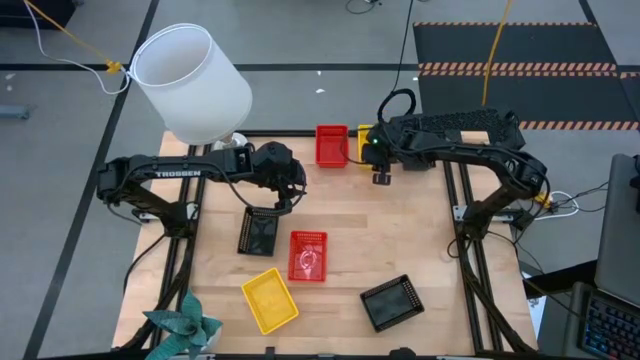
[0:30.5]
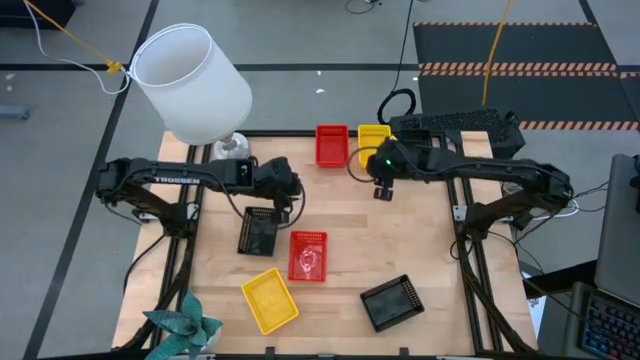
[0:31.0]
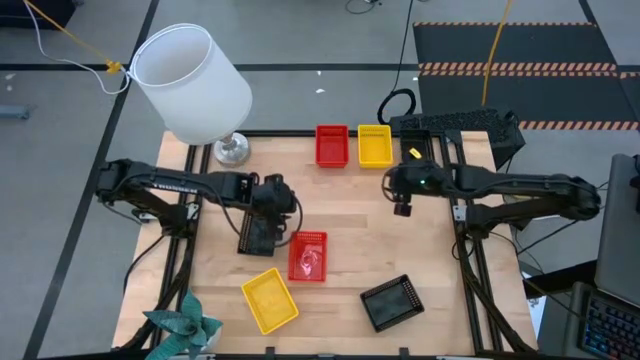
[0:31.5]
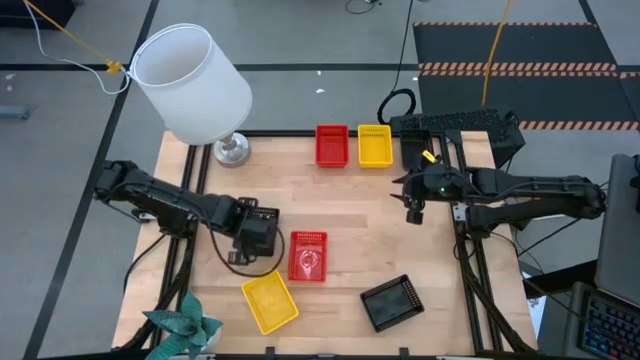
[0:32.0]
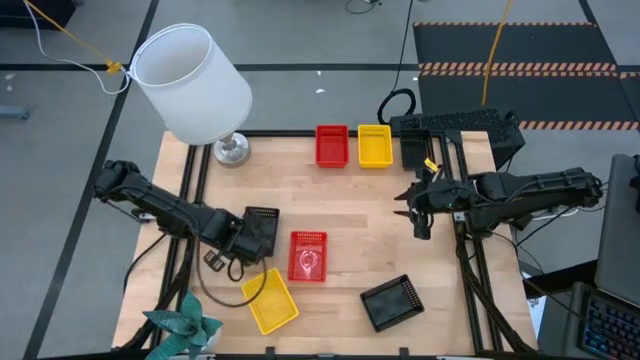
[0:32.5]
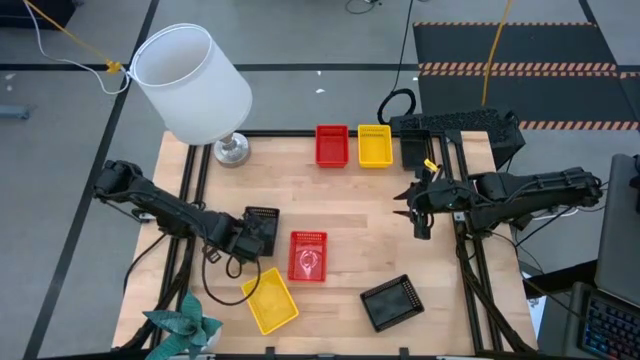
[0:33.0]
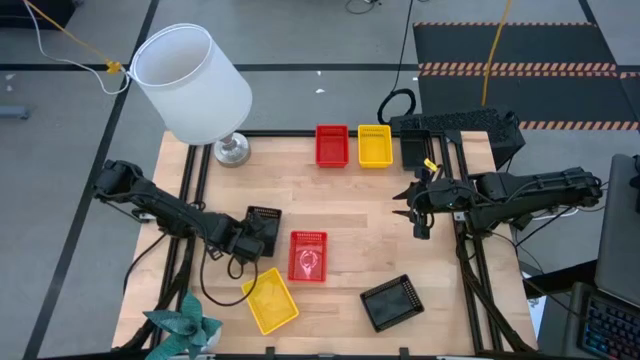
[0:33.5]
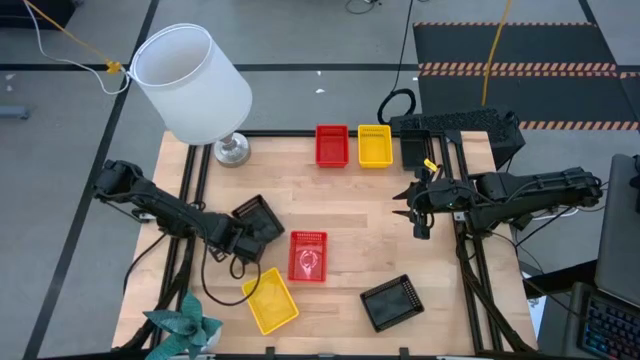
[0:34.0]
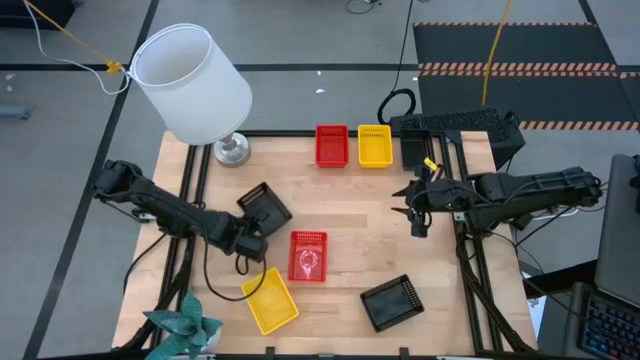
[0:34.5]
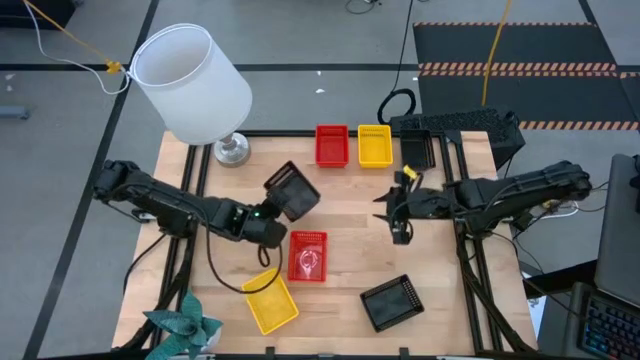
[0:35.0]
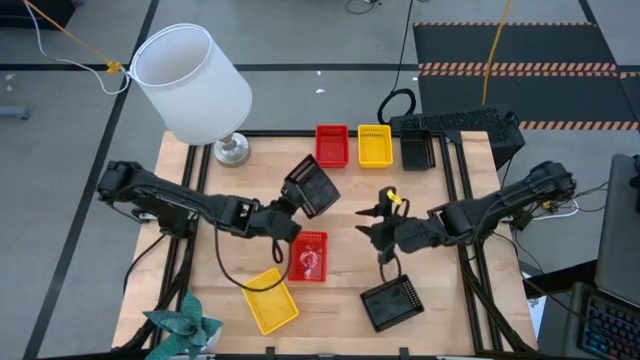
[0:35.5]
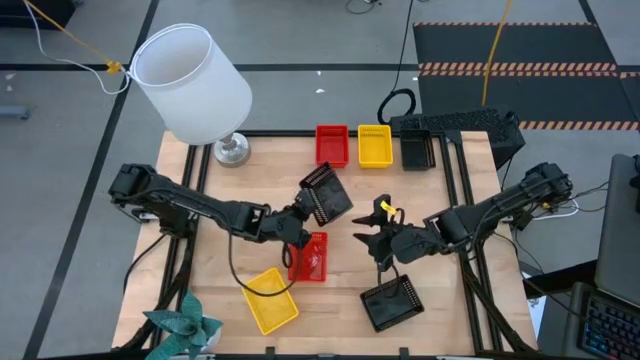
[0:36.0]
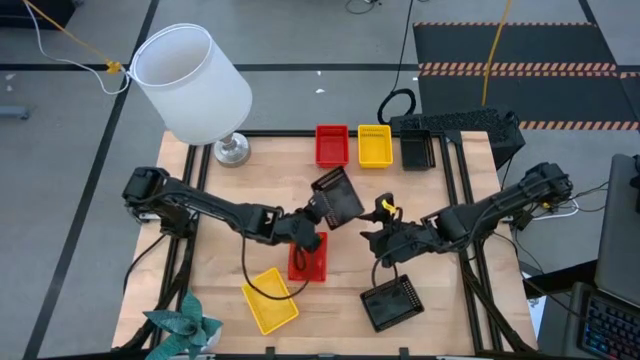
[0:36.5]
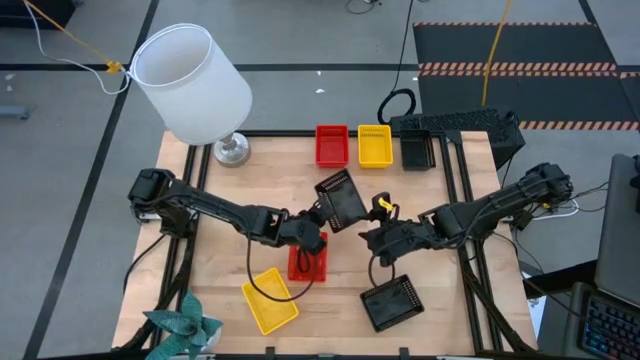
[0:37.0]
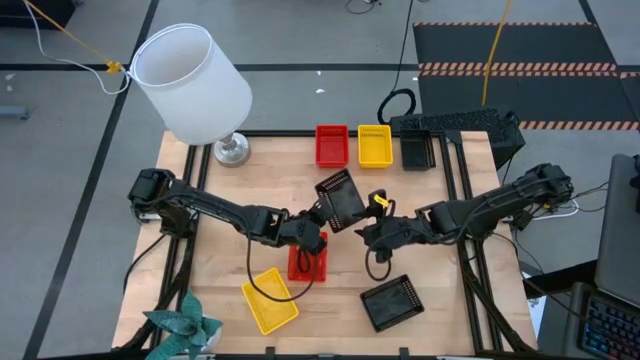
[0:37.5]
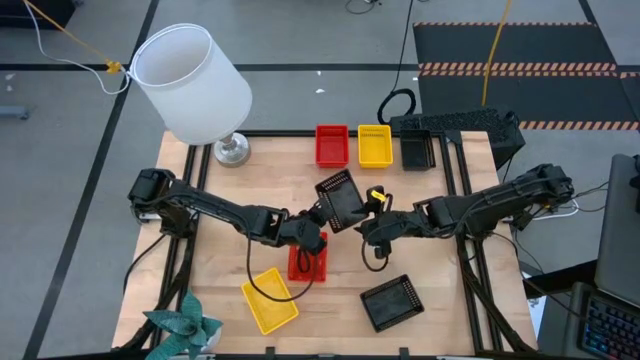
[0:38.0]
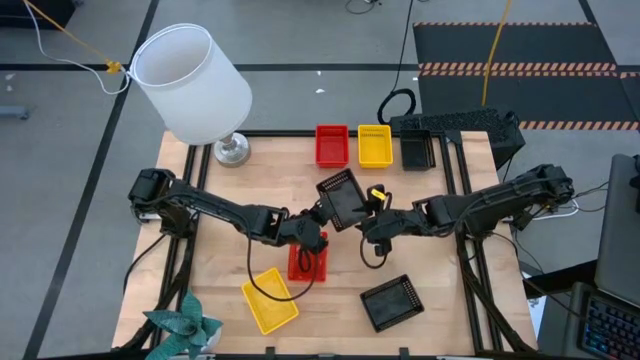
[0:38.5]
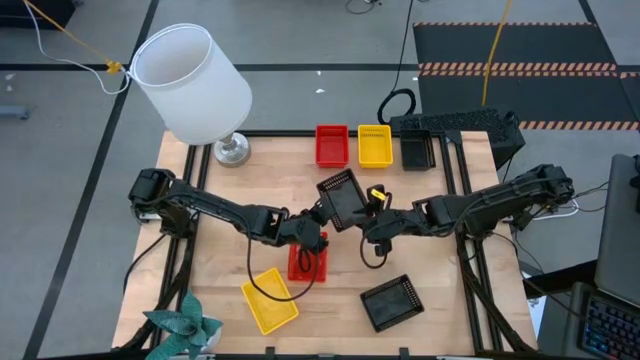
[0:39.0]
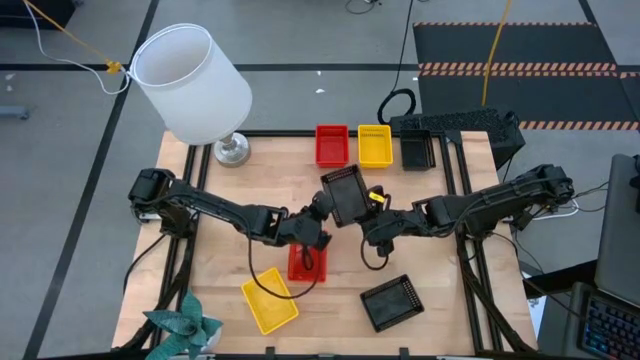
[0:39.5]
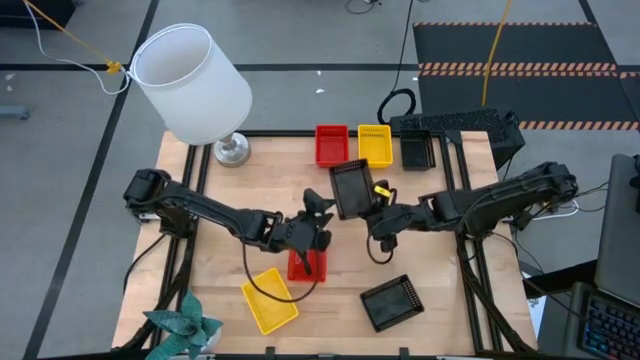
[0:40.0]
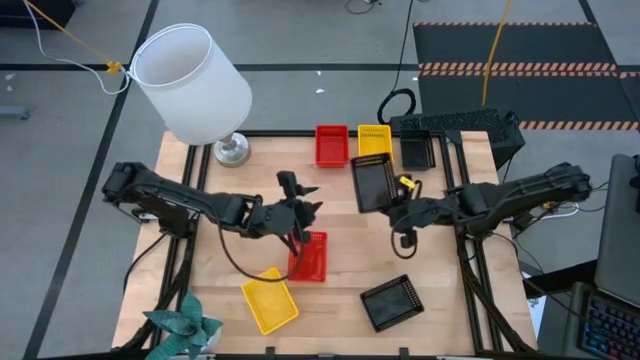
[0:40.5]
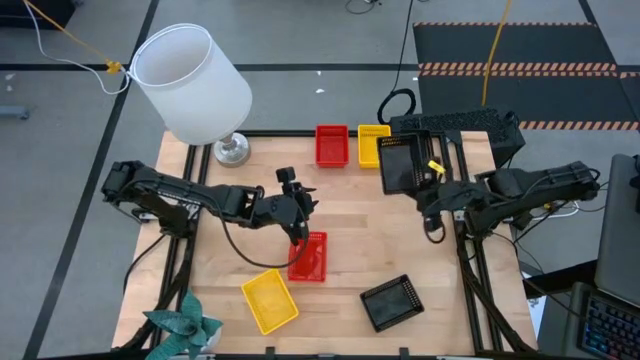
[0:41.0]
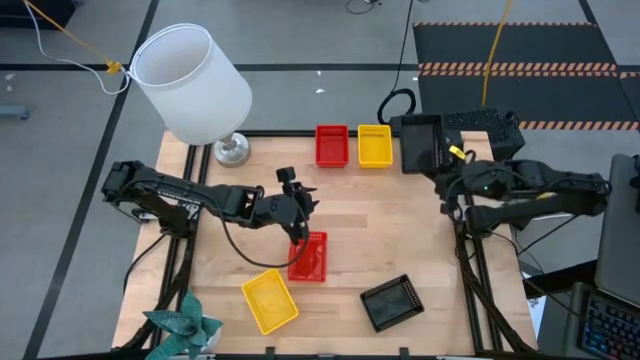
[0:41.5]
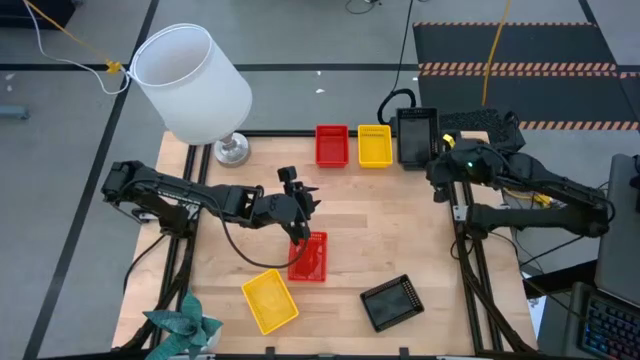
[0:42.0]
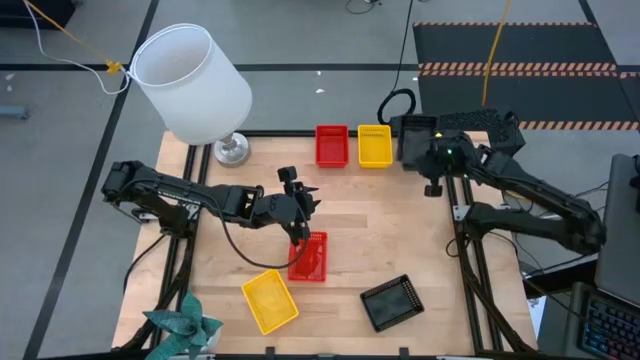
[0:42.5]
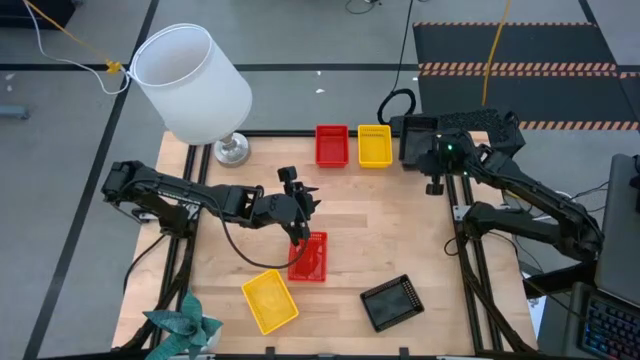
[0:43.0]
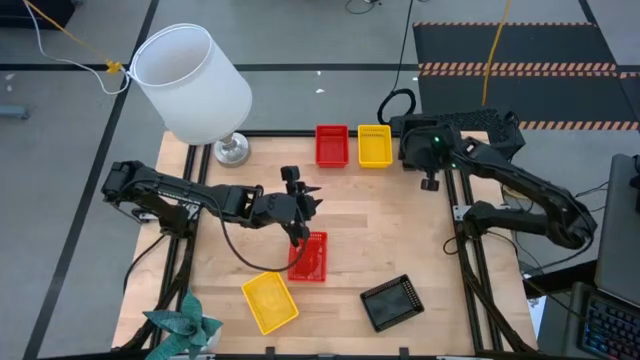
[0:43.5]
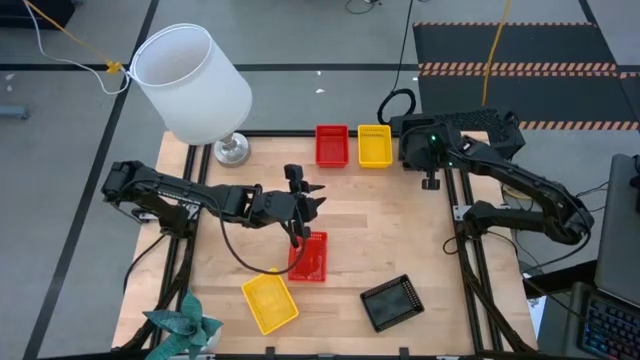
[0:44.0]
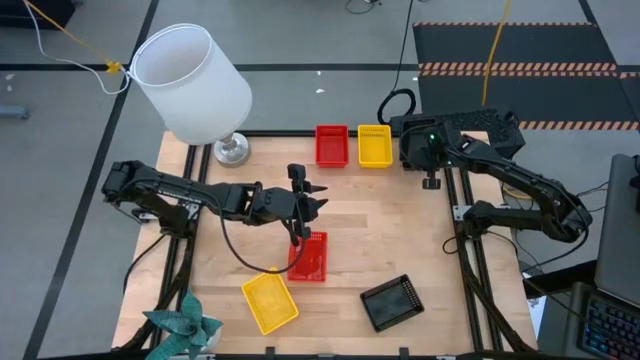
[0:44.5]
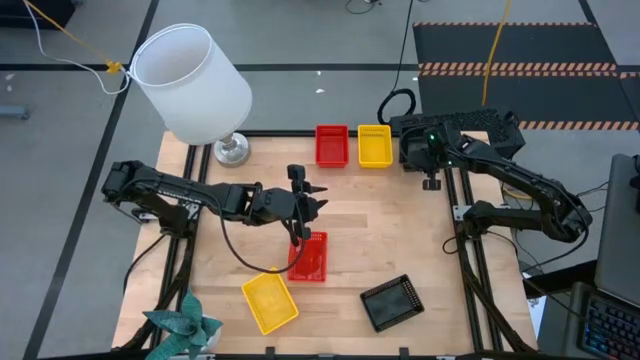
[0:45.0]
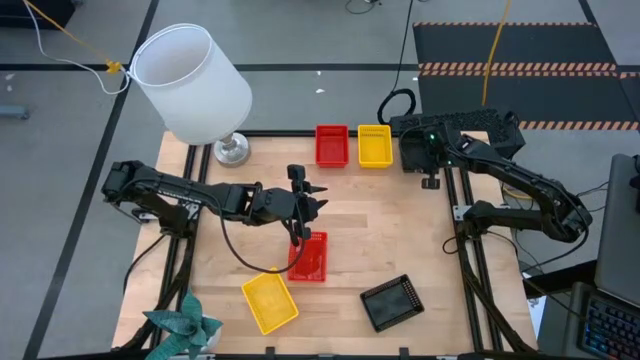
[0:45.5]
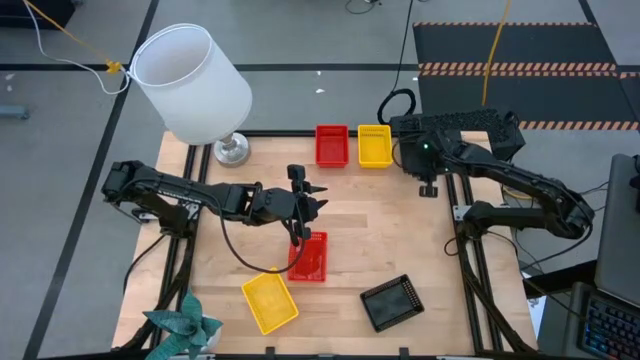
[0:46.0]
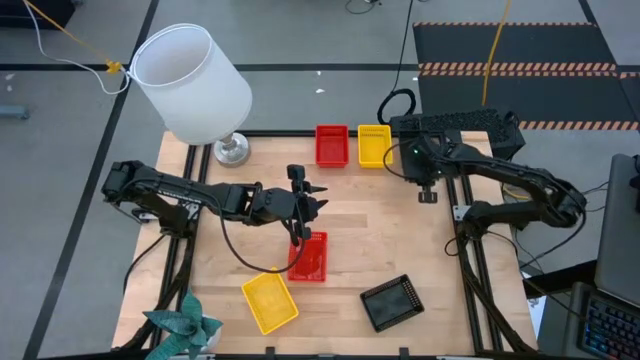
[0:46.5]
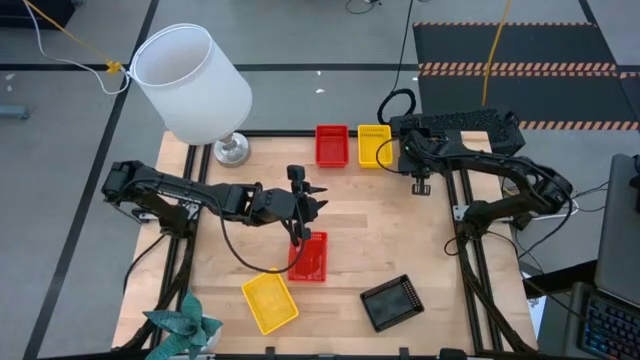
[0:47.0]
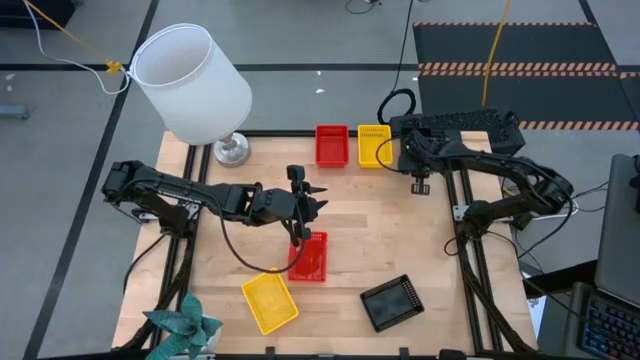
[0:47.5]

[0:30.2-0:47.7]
Stack the bottom left black bin on top of the top black bin

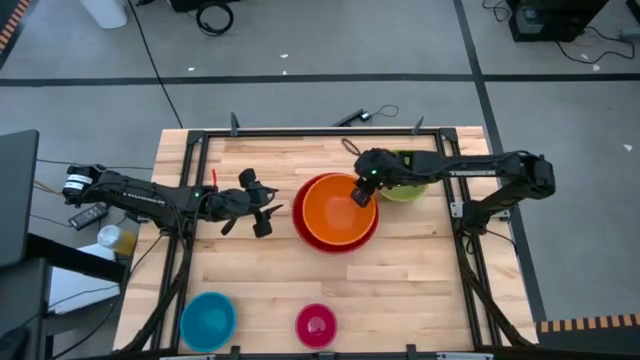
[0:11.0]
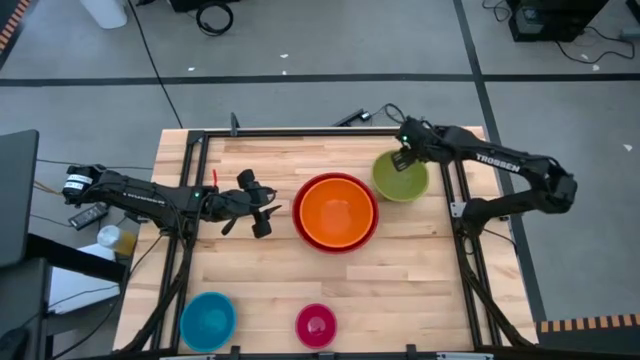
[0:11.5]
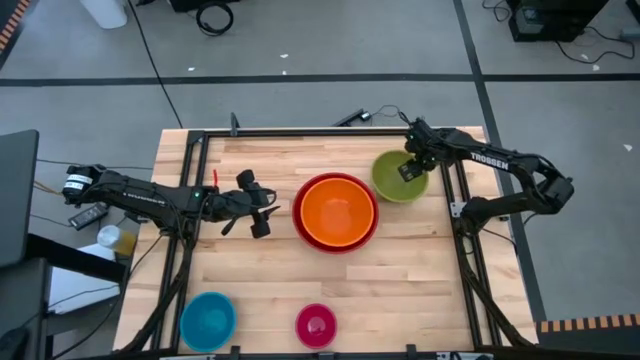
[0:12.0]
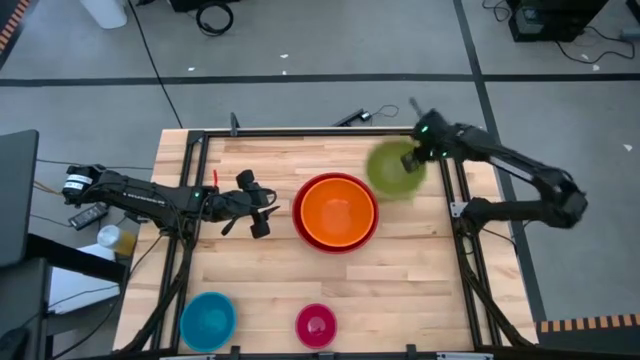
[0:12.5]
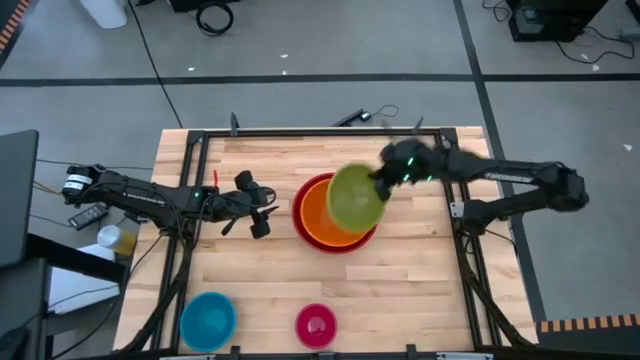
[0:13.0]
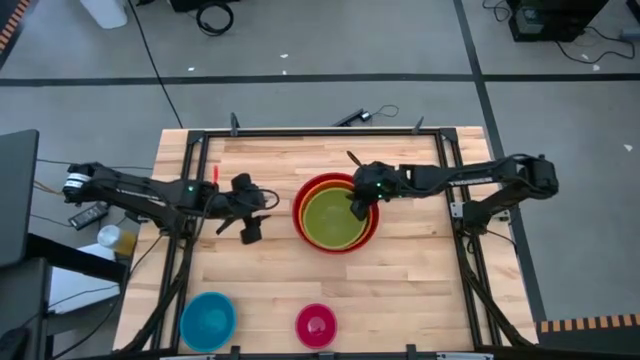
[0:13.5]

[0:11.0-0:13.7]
Stack the green bowl on top of the orange bowl

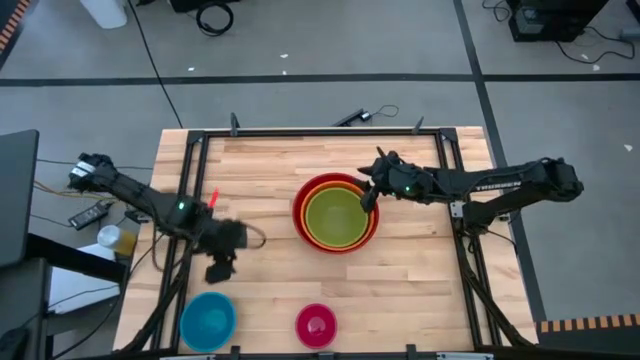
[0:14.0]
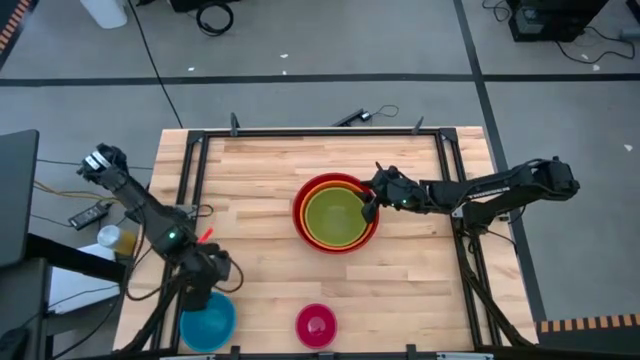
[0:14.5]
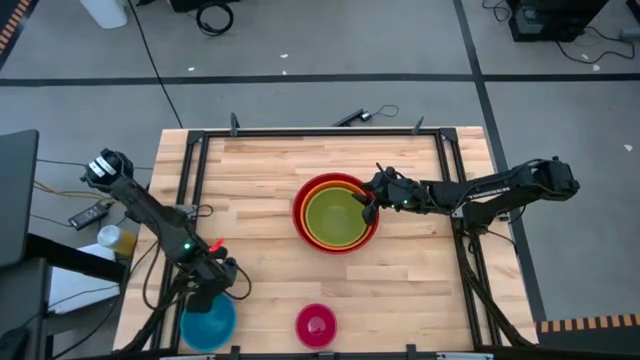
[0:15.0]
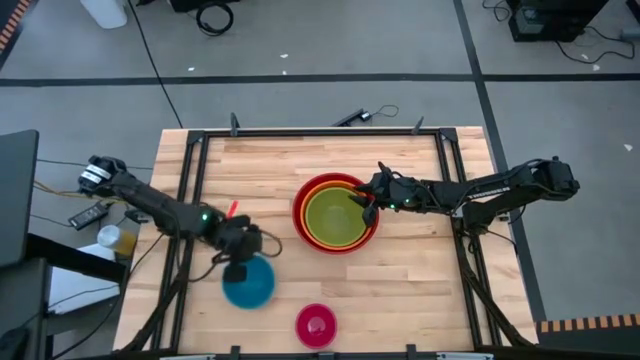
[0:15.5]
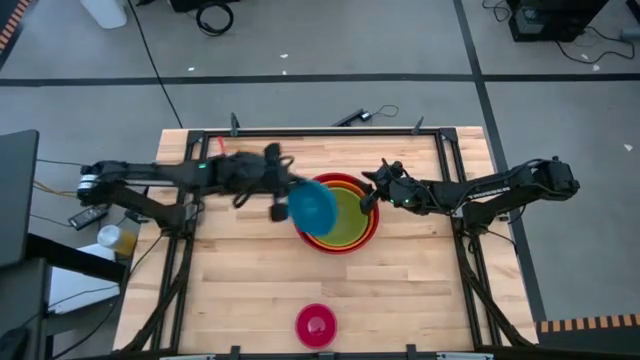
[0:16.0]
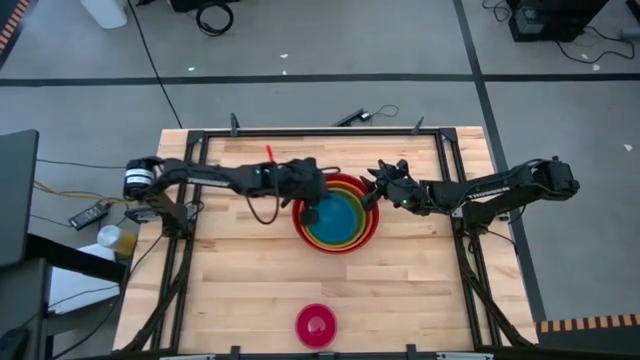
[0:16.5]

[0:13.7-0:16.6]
Stack the blue bowl on top of the green bowl
